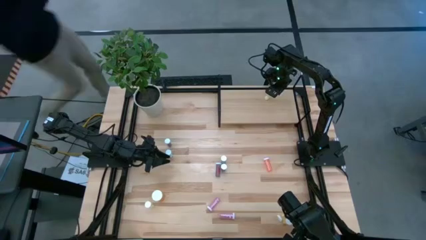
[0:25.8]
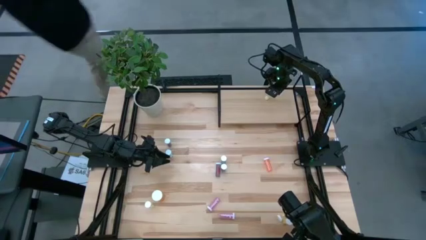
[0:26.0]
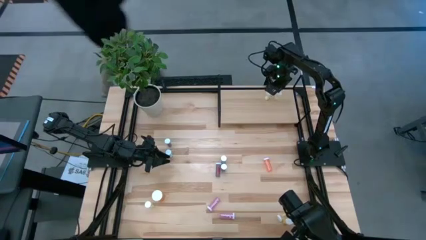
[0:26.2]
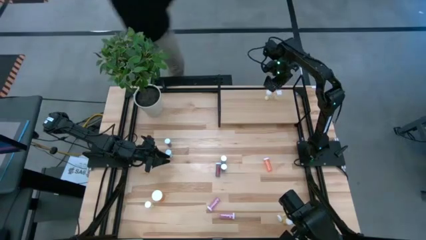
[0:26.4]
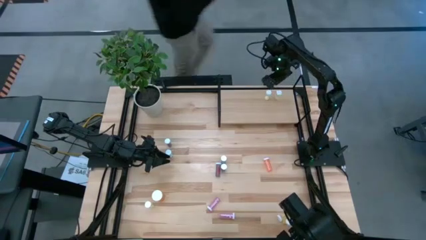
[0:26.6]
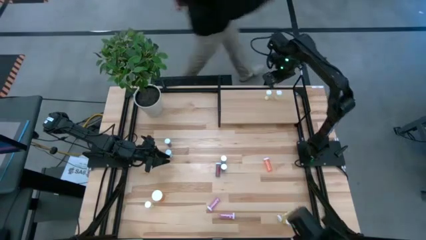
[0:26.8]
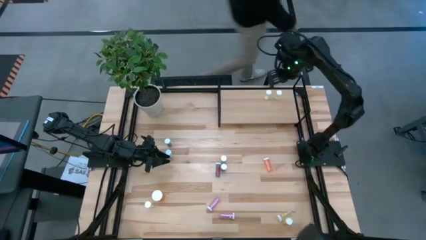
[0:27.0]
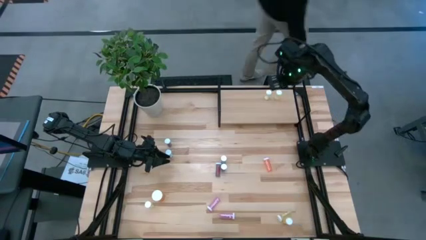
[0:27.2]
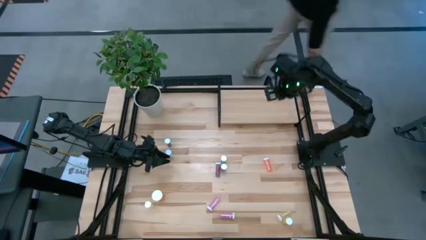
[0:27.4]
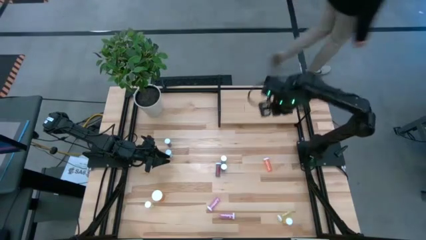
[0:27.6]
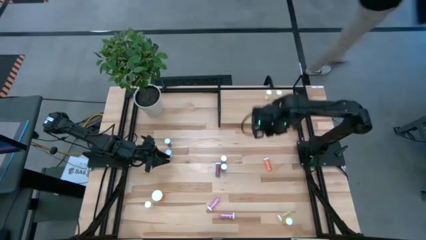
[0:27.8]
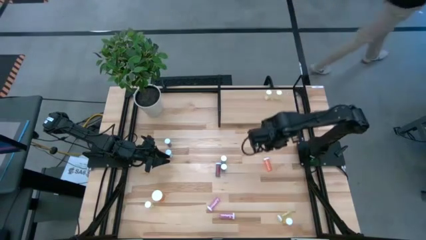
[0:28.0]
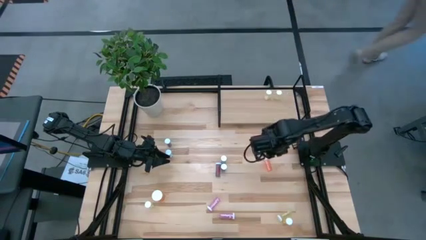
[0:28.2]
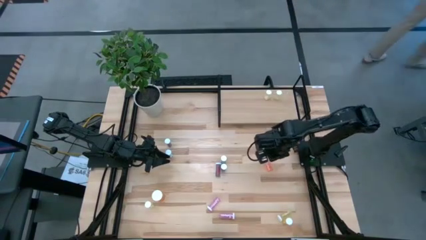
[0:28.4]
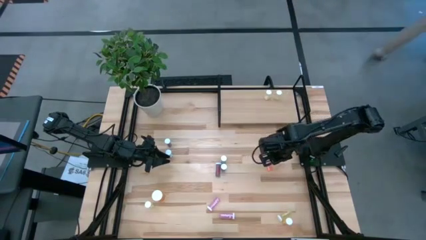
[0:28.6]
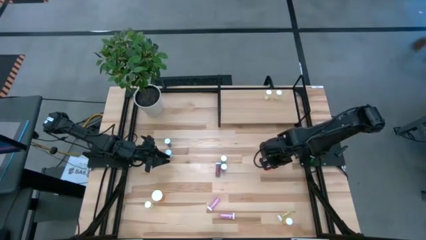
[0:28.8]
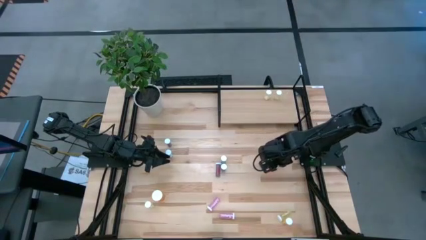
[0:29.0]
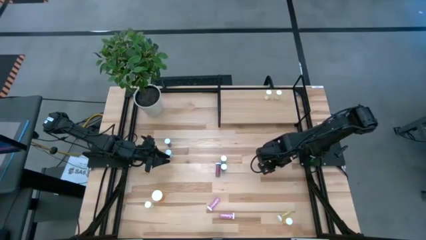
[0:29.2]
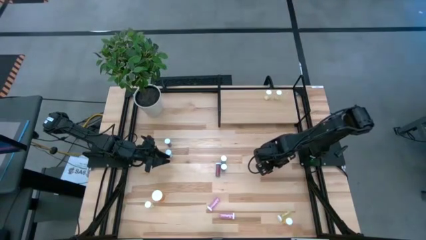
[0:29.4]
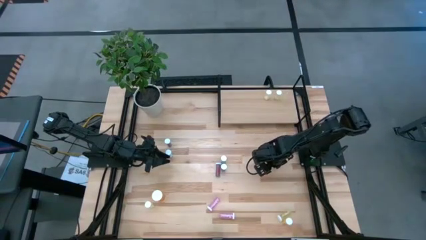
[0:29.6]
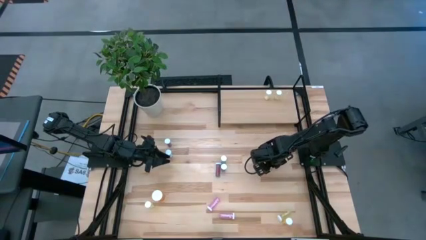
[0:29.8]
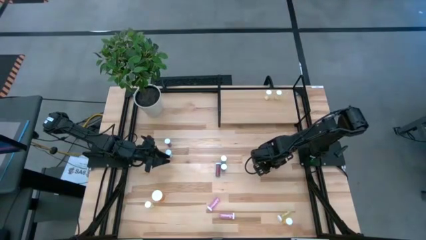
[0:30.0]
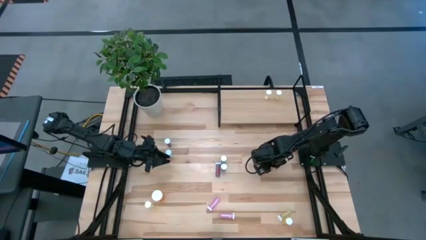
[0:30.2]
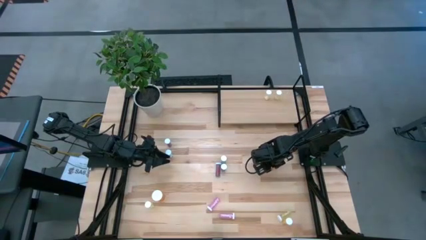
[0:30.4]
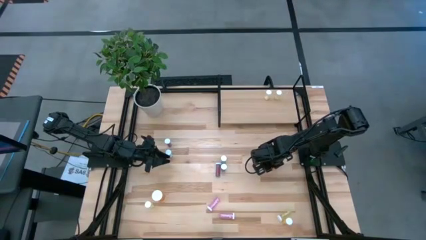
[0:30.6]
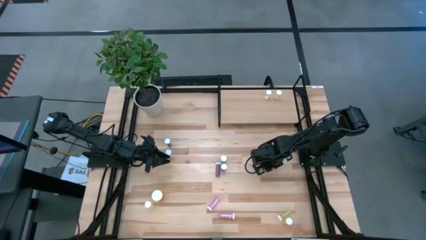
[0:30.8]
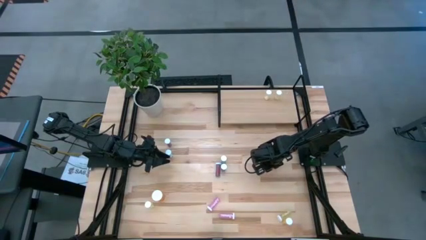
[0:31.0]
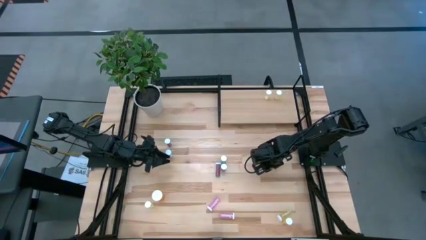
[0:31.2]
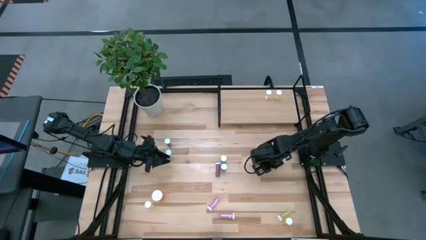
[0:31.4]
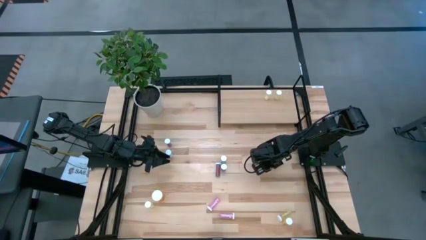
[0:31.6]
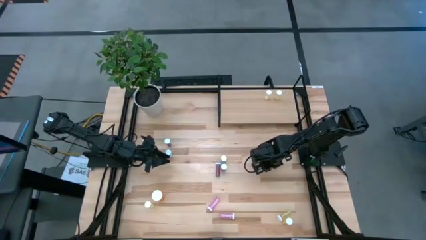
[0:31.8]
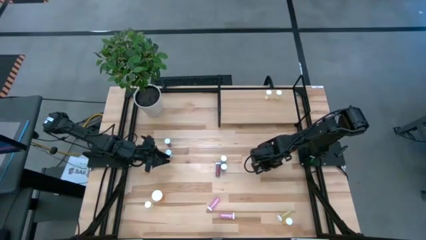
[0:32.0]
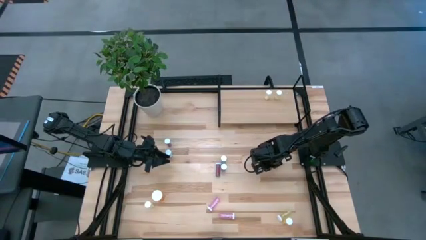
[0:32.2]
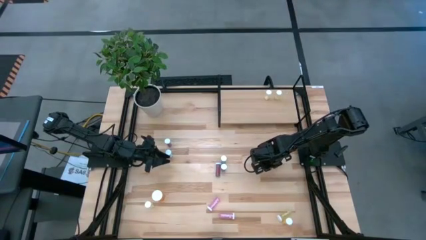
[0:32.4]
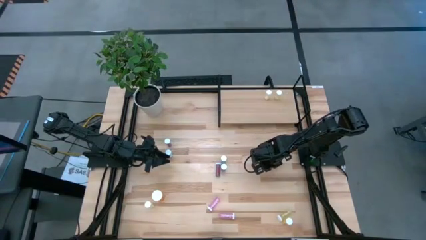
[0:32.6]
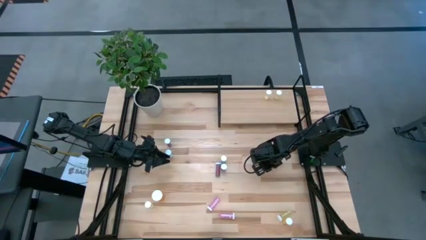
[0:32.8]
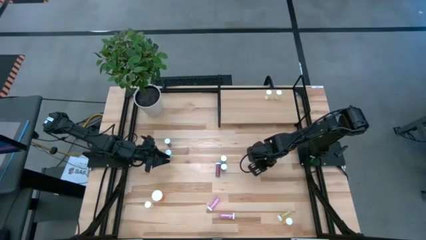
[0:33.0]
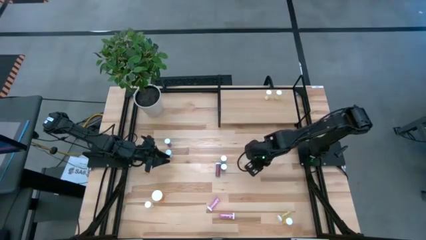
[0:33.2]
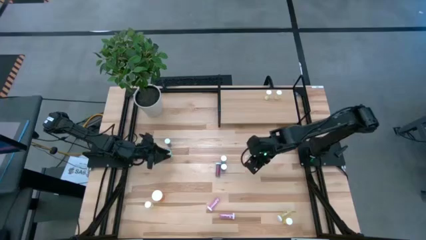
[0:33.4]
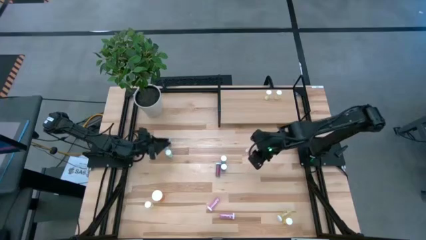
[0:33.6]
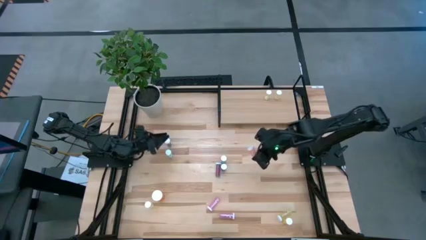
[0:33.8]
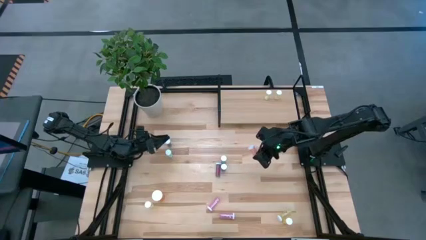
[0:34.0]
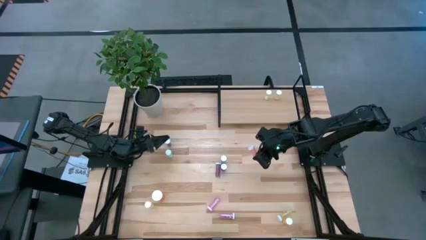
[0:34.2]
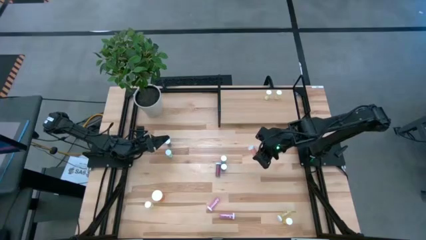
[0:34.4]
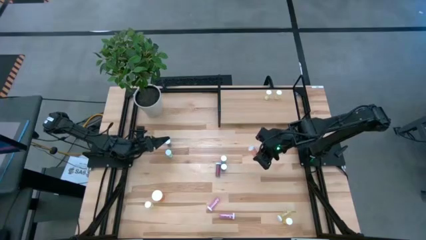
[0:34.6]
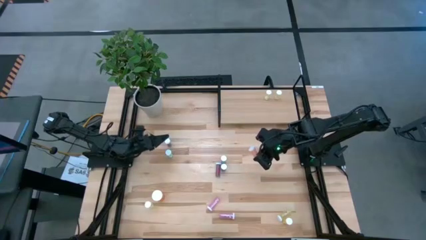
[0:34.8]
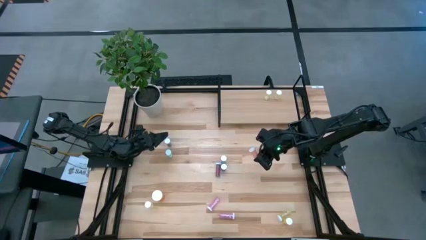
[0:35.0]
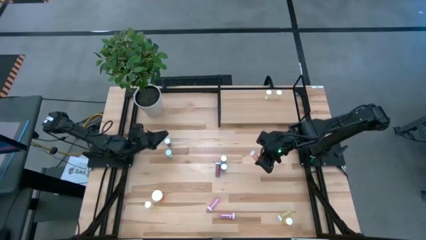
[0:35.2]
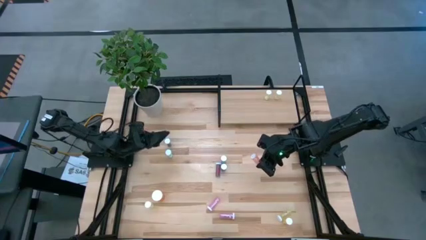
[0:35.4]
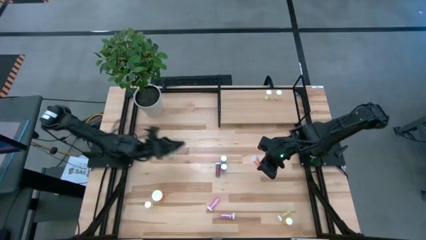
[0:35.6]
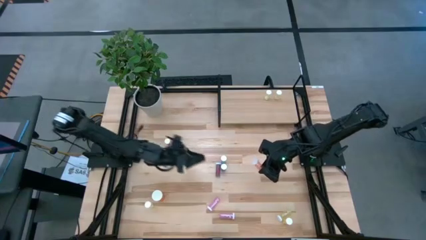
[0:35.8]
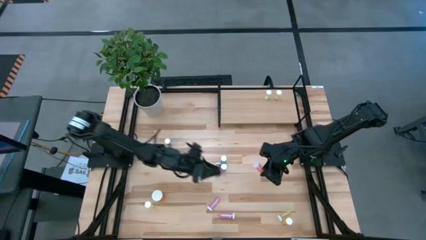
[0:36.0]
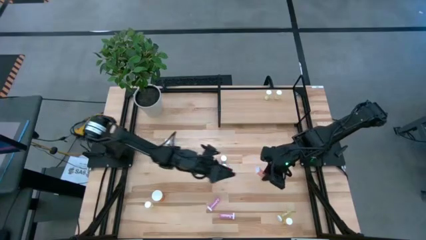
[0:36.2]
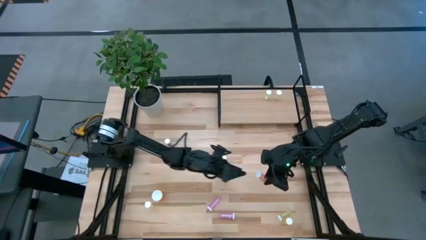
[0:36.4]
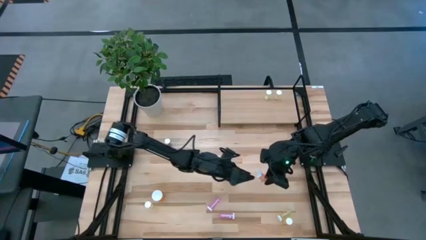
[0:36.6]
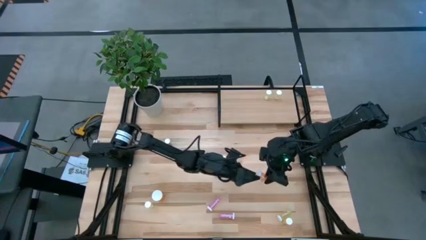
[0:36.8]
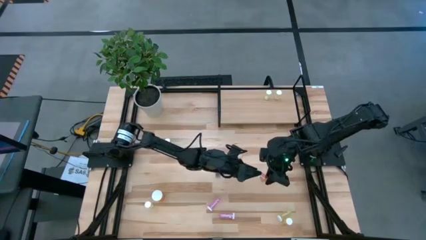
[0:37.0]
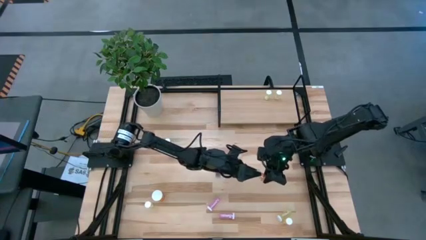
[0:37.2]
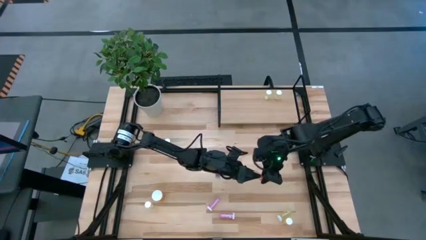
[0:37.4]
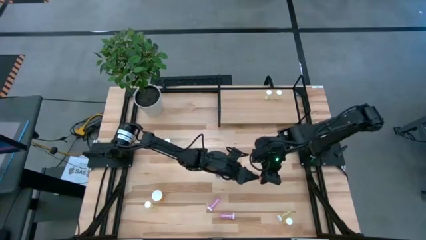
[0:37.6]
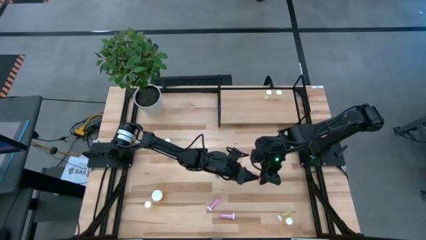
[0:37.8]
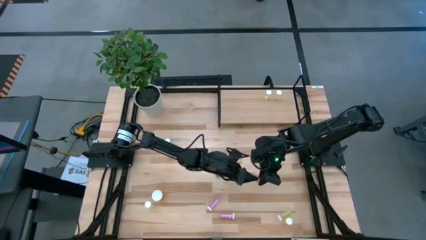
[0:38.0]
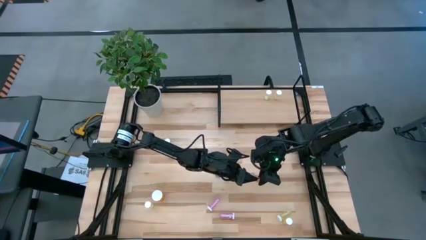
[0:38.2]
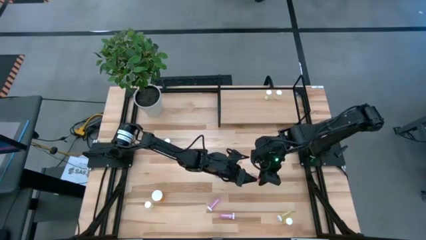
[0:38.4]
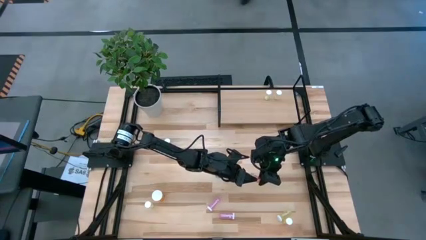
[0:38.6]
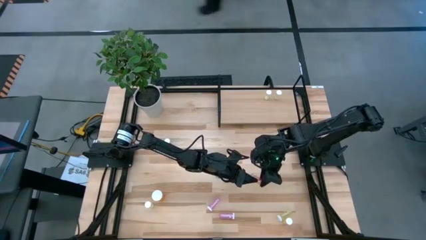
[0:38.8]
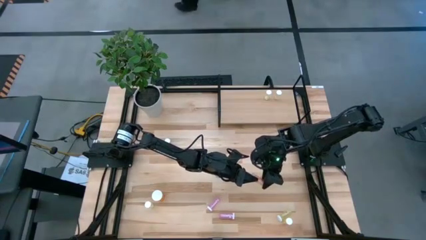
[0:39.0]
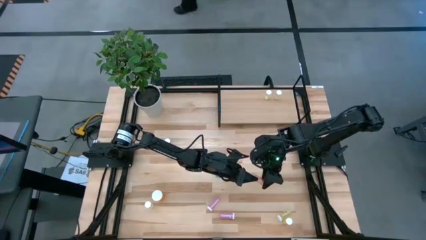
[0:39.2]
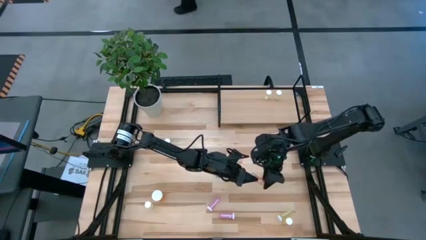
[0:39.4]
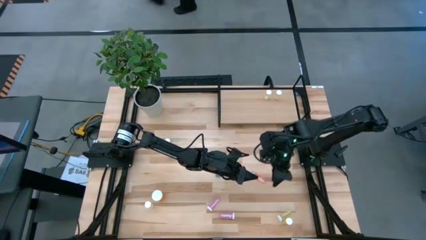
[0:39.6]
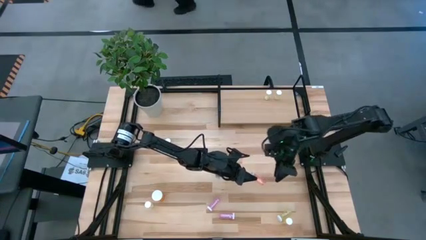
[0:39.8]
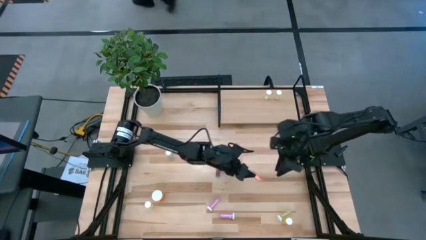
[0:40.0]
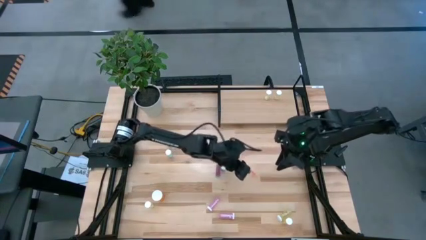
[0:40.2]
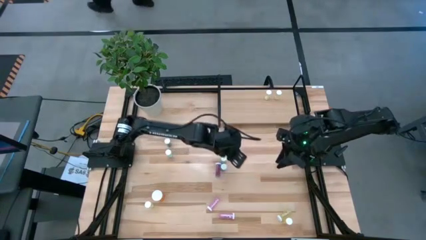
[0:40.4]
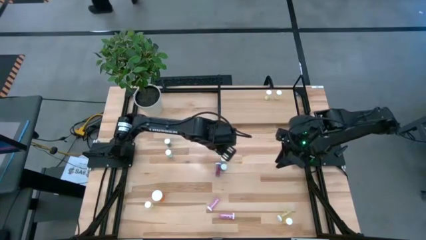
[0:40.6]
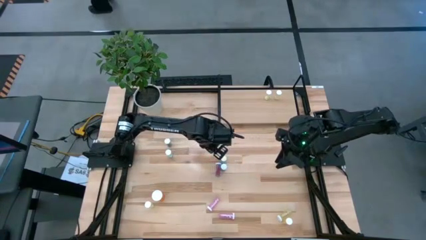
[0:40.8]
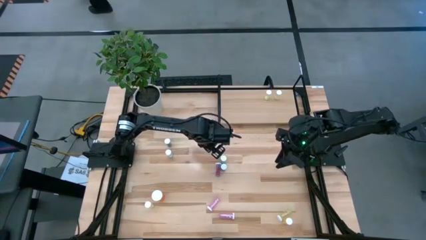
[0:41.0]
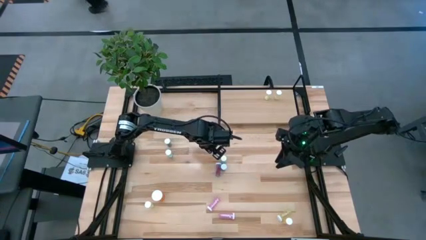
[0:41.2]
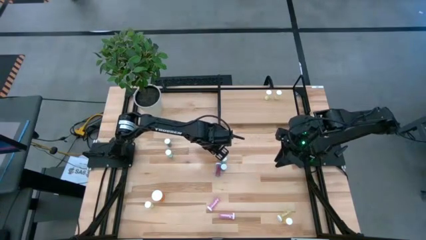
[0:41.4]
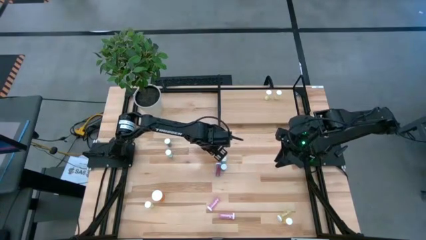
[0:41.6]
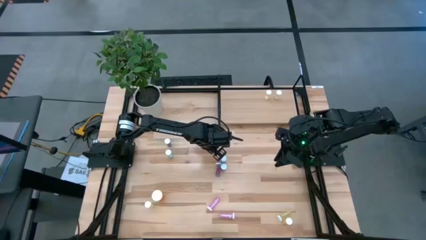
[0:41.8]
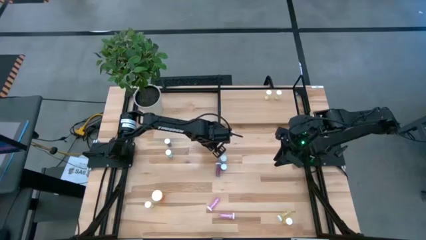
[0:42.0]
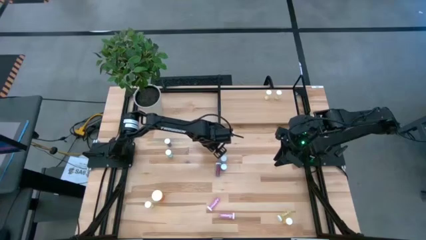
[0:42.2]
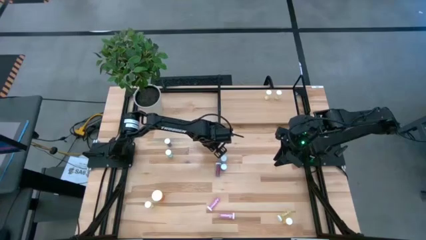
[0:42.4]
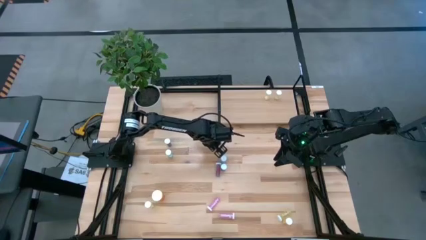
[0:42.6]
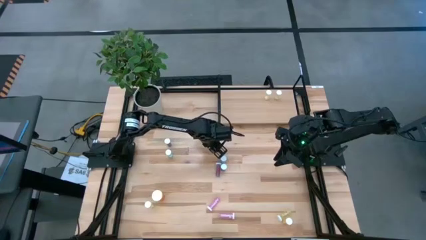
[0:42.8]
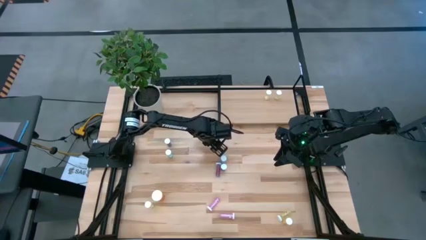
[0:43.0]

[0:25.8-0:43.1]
Task: Pick and place medicine bottles onto shelf by color
Move the top orange pill bottle to the center of the table
